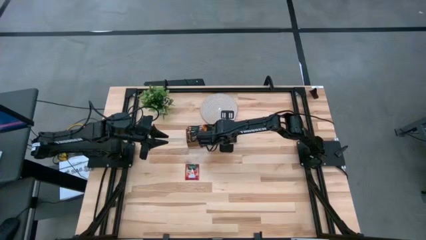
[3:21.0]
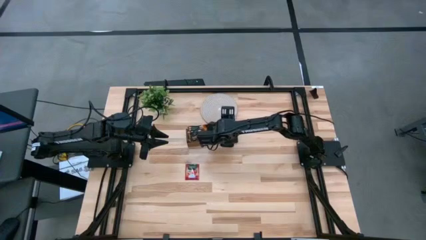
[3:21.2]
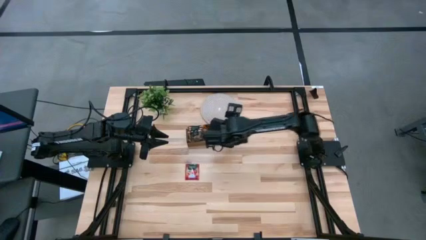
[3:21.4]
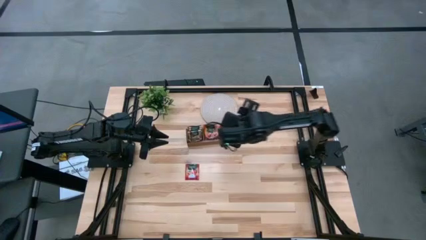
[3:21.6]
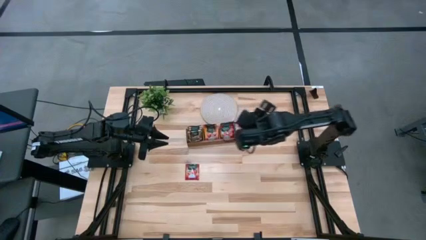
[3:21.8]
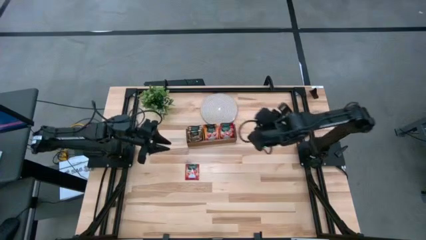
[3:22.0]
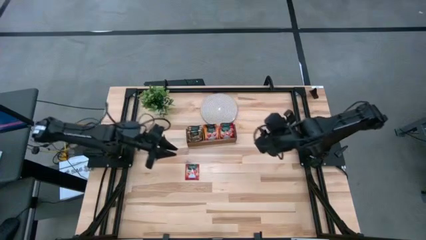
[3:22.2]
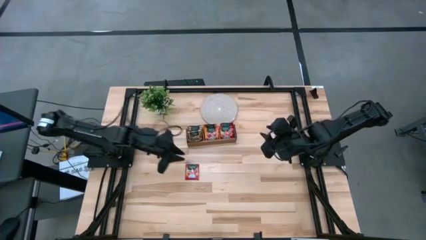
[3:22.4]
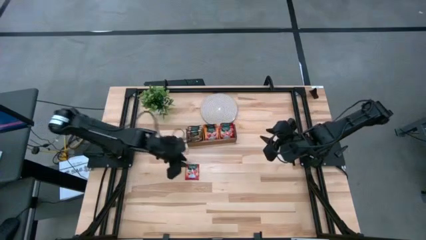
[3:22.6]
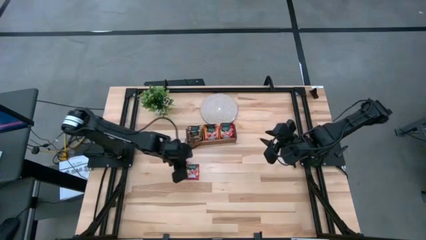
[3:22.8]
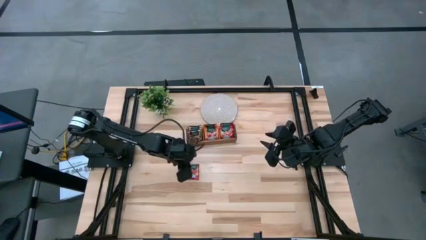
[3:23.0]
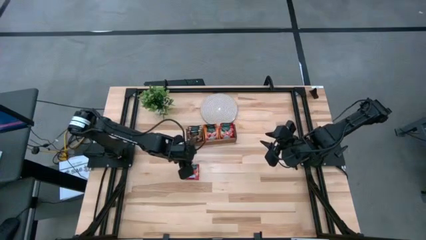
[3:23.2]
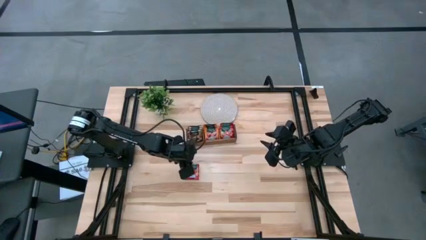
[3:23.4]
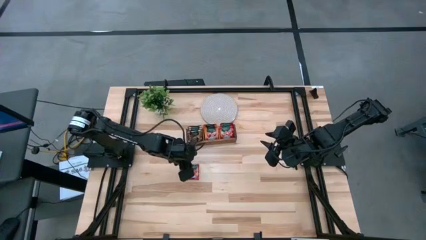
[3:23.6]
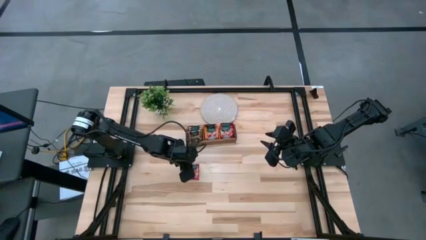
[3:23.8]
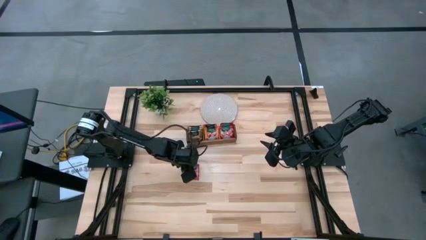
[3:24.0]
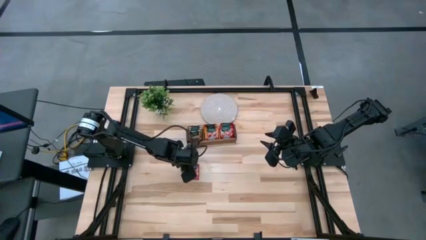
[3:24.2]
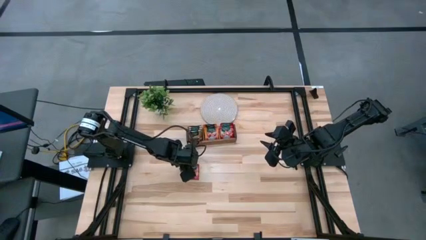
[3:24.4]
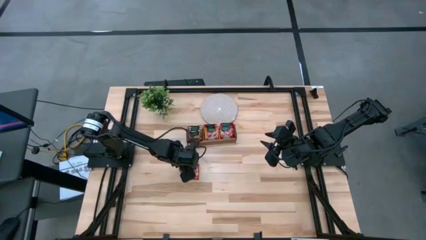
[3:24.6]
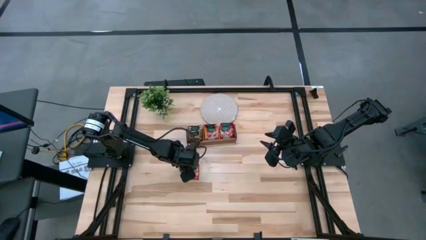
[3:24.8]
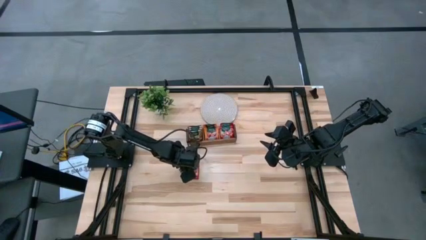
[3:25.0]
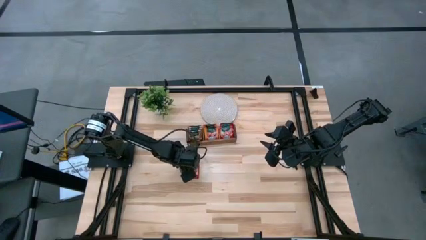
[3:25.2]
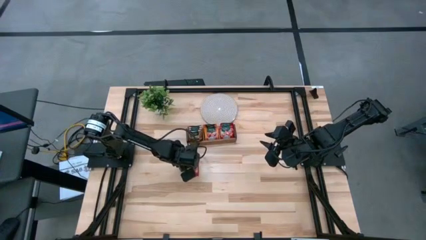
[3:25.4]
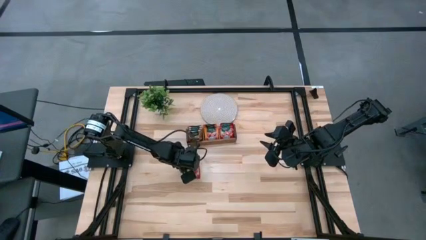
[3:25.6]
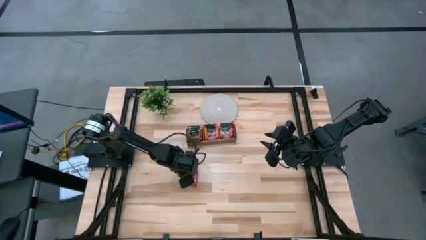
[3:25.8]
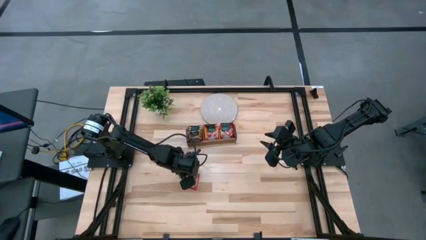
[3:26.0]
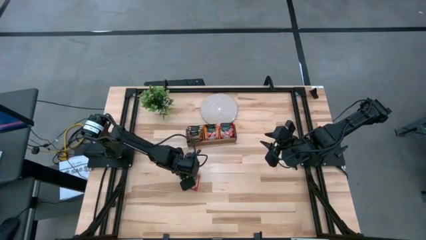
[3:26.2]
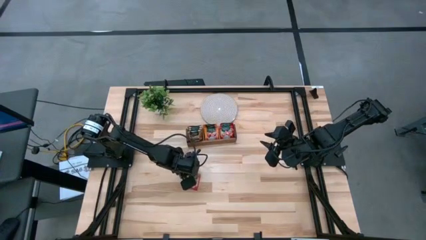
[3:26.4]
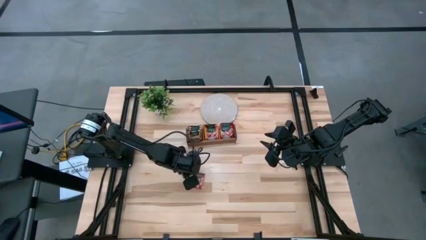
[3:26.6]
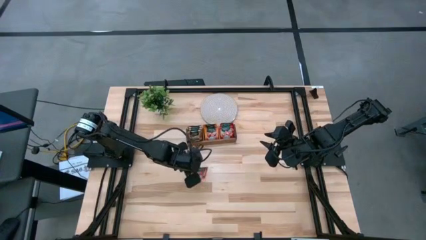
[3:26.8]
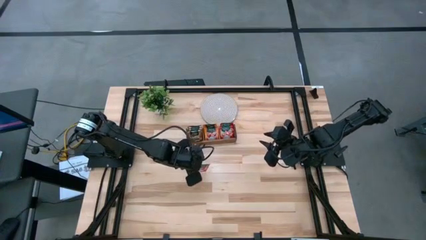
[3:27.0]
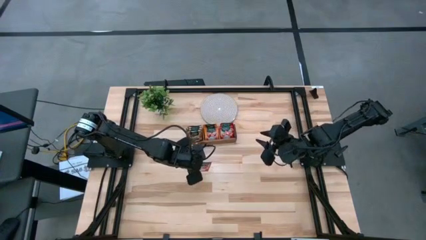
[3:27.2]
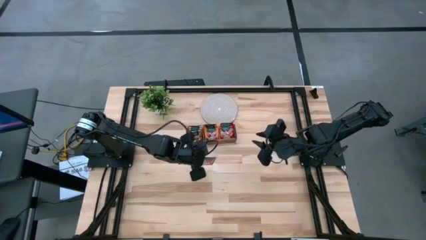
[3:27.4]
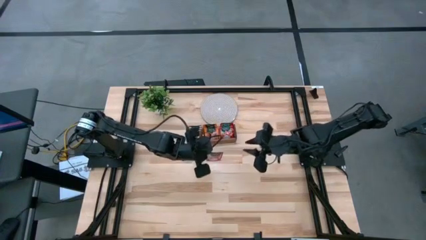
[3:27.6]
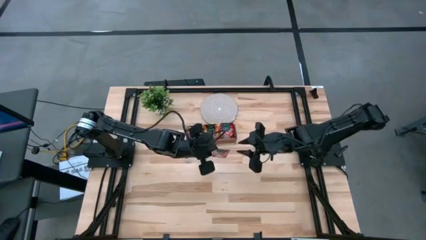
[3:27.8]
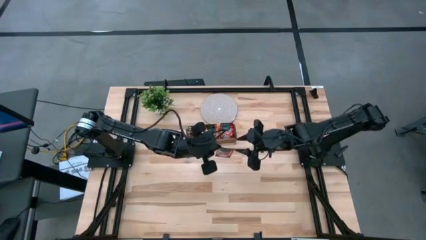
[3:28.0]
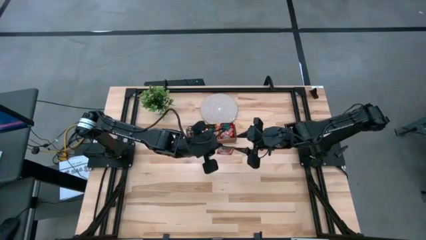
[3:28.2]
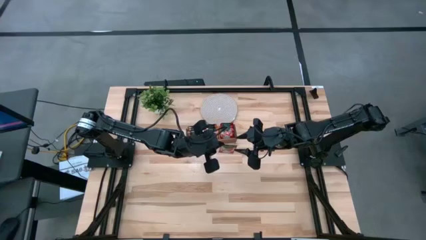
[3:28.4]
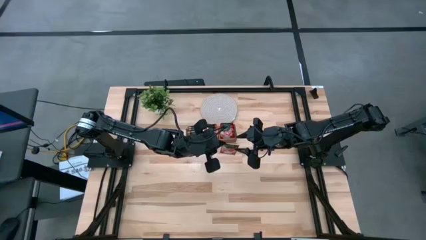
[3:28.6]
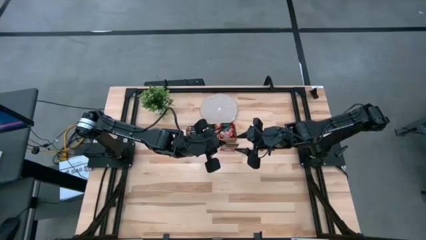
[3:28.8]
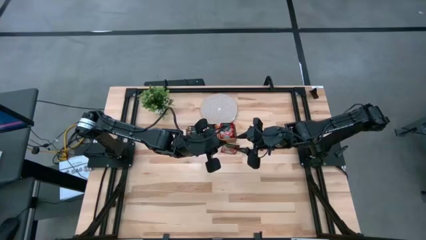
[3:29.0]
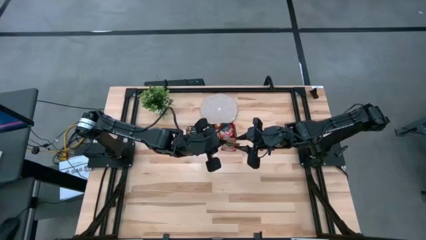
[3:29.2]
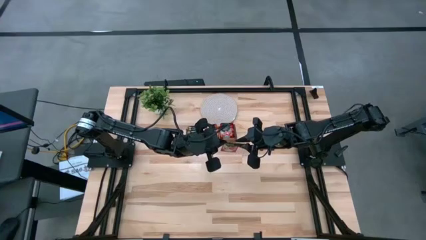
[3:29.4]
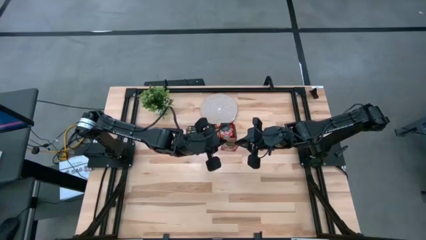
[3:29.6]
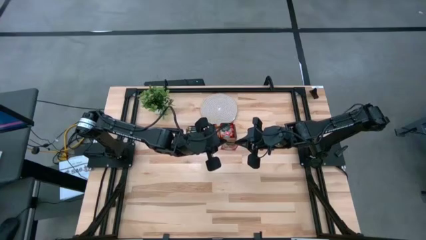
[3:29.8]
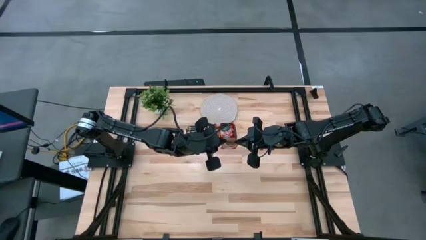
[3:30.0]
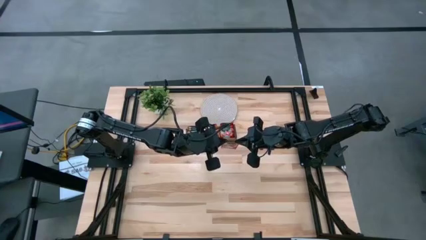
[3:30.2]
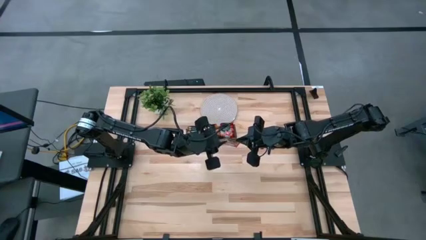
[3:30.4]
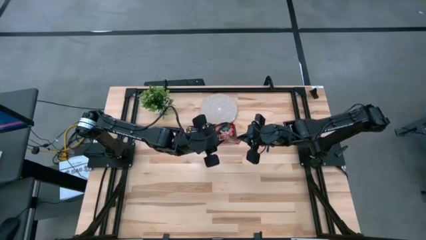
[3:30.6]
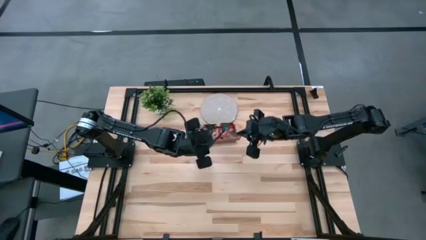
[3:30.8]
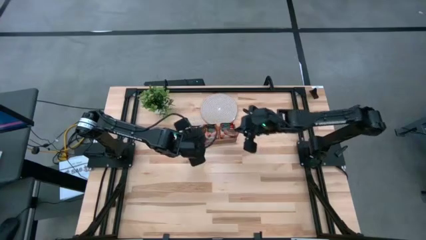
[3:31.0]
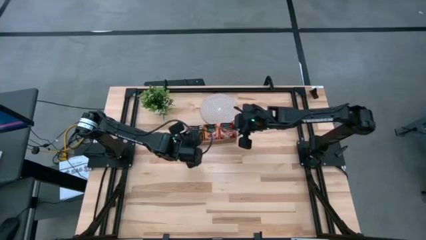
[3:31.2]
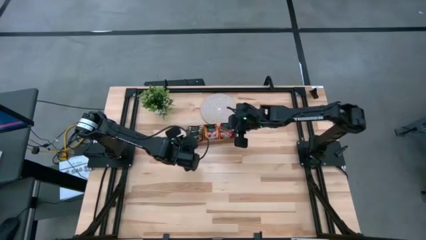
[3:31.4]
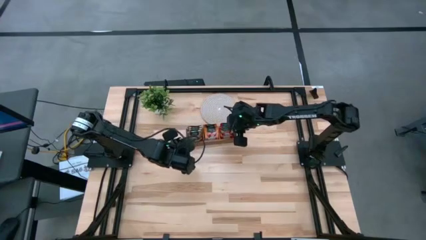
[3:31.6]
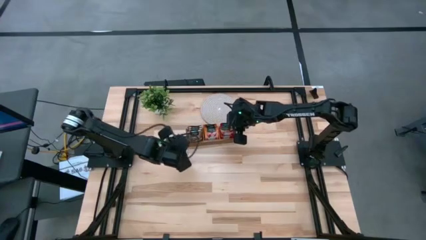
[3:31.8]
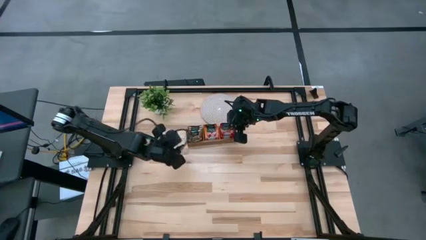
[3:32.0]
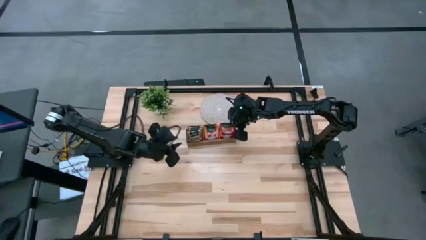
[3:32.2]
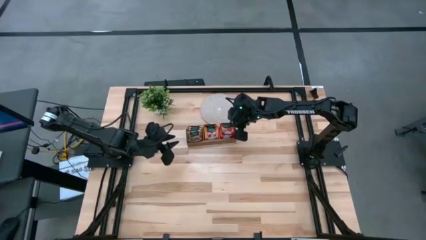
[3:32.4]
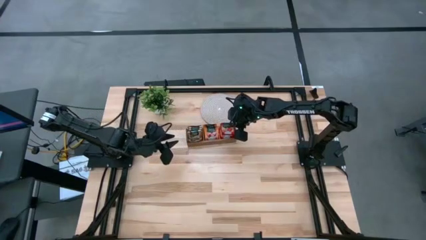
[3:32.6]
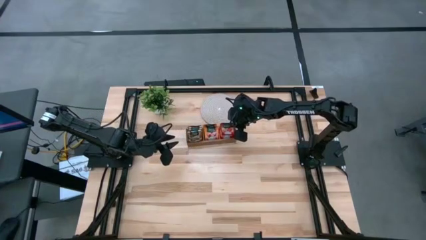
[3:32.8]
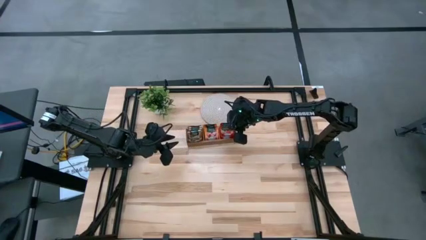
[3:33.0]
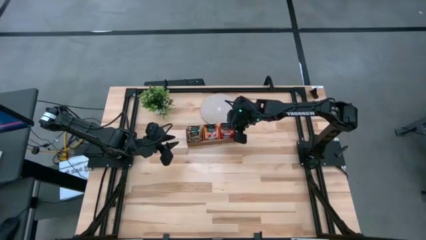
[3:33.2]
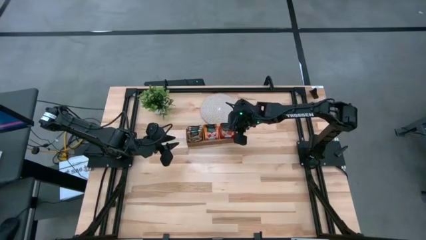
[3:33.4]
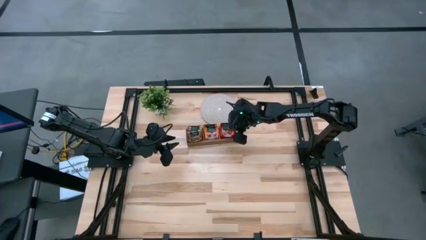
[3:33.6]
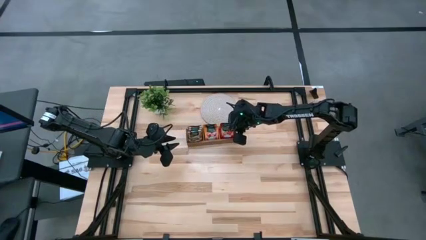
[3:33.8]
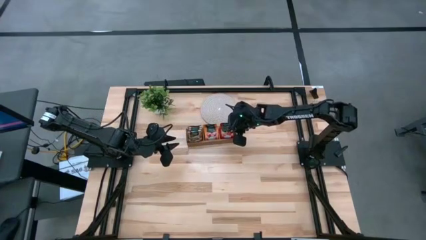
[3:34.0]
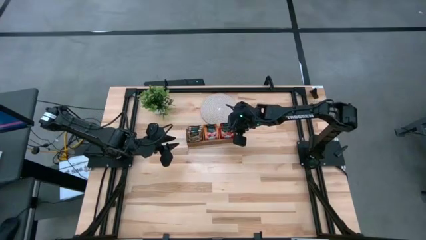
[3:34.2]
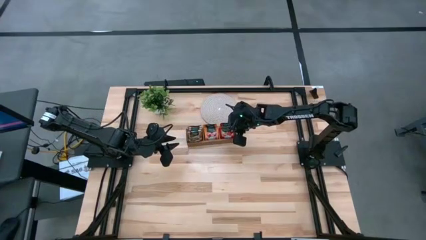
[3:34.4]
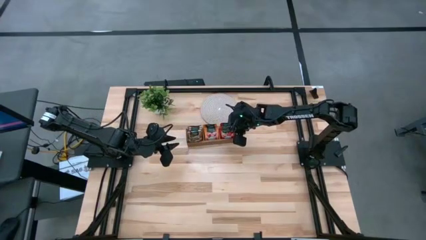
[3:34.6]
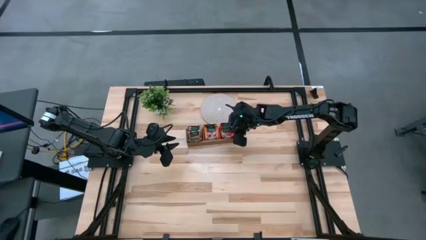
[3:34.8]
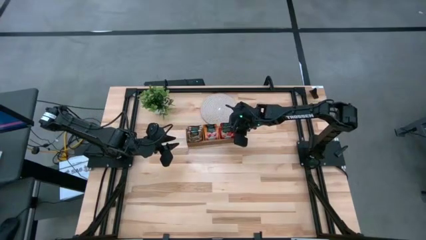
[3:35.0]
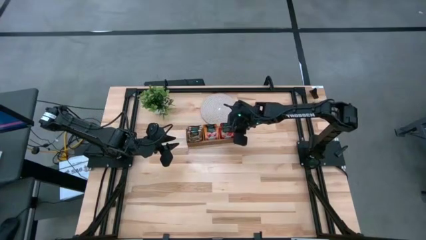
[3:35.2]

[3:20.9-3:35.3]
Task: Pick & Place Tea
Put the red tea bag into the right section of the wooden organizer
